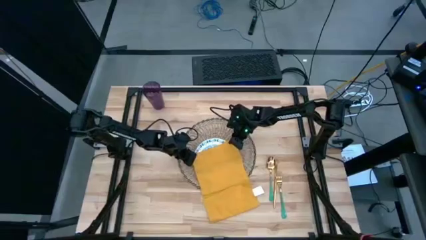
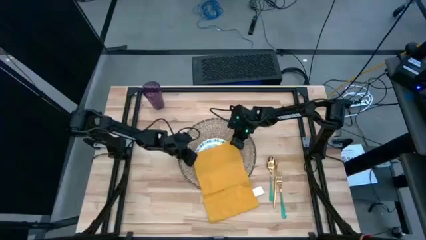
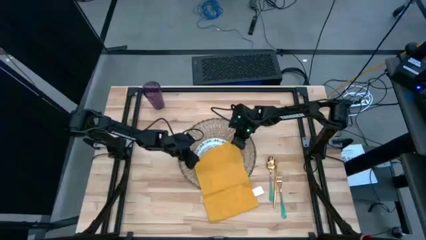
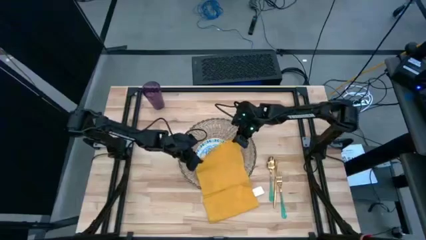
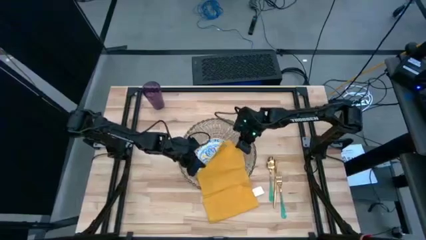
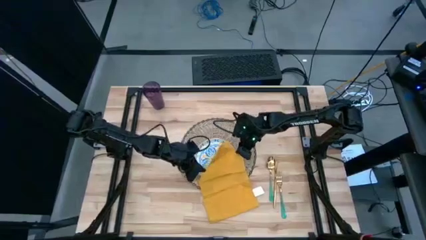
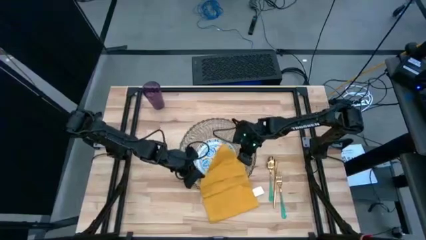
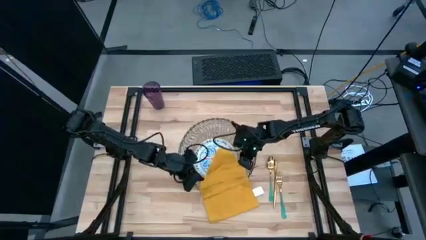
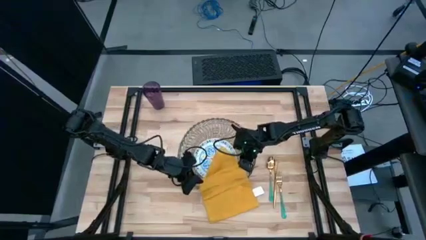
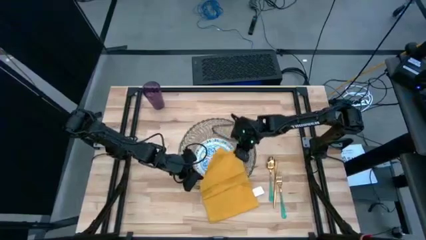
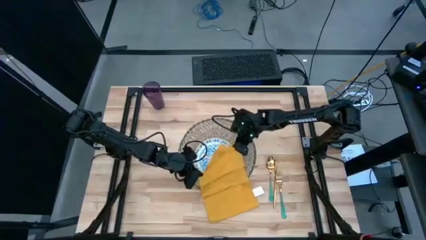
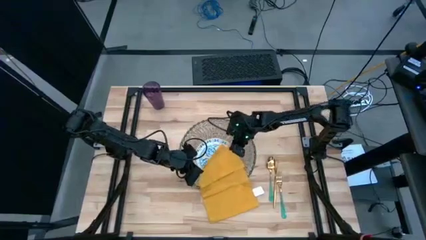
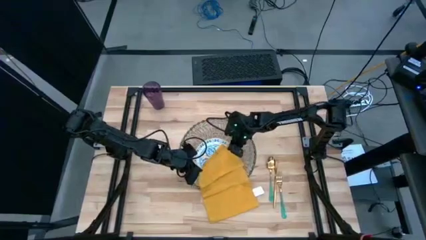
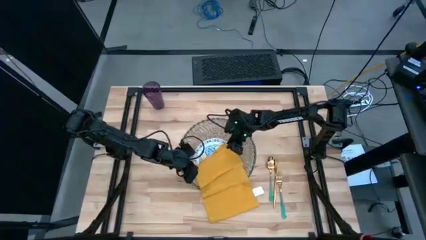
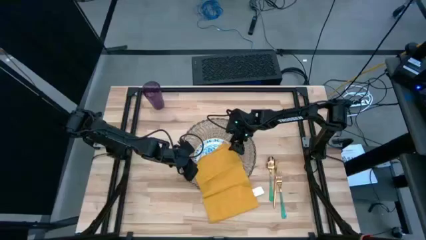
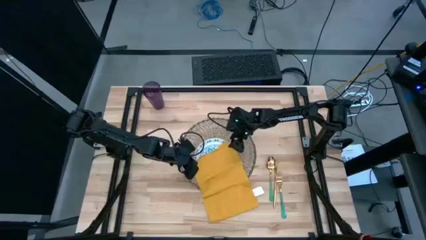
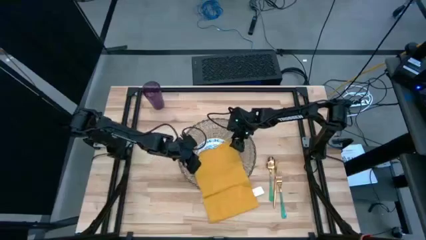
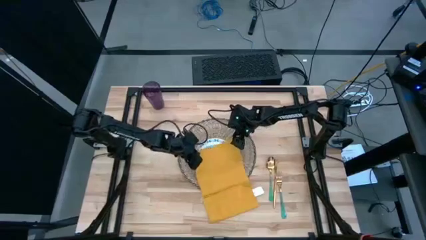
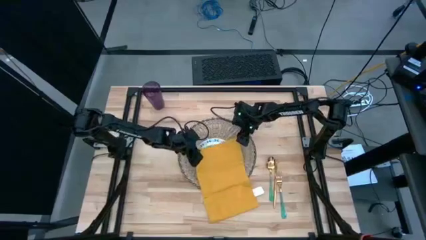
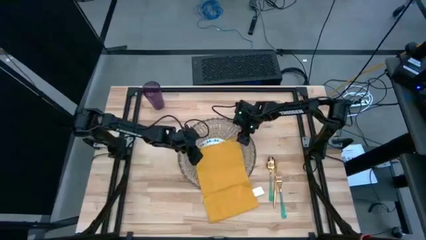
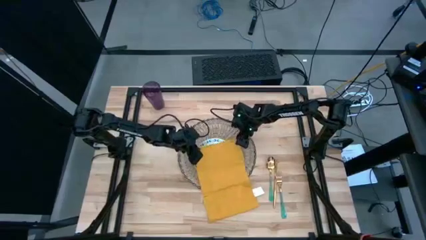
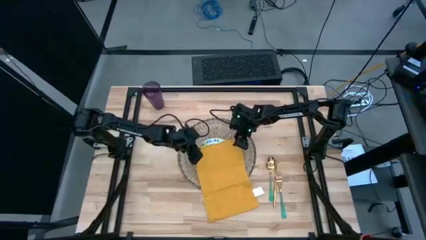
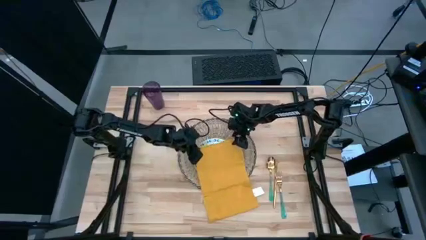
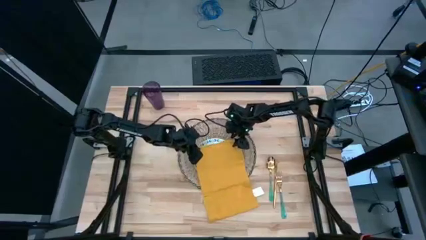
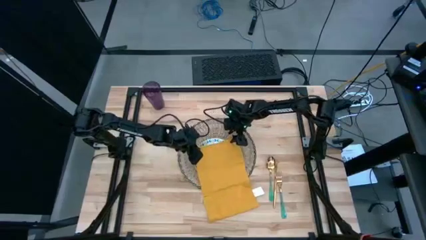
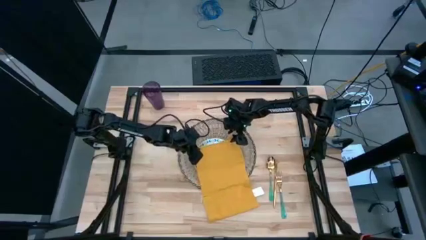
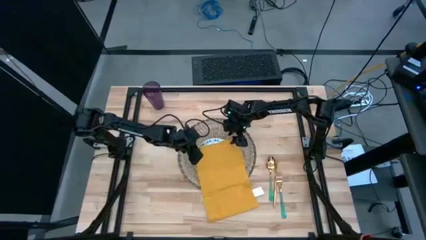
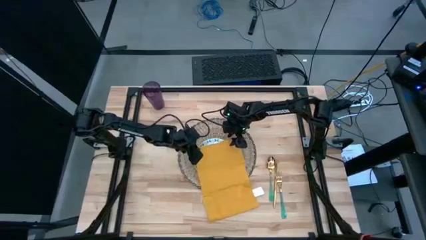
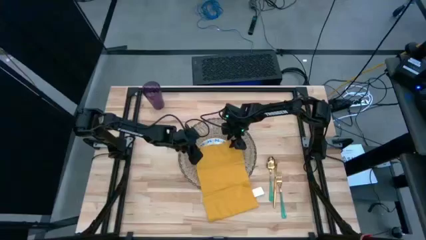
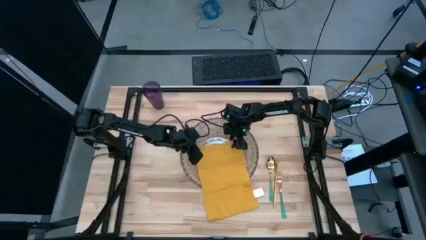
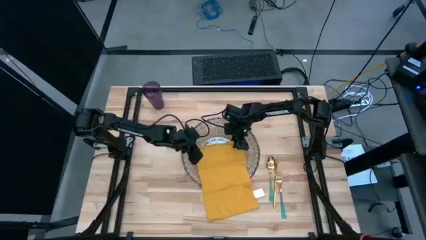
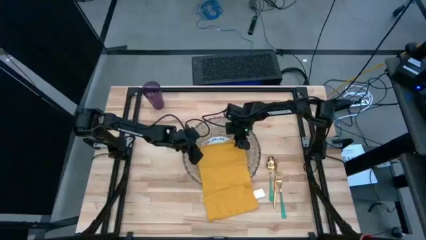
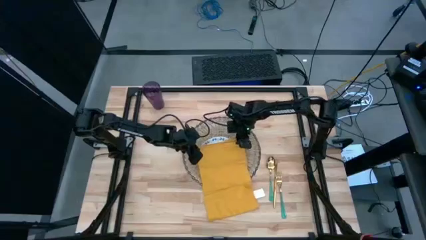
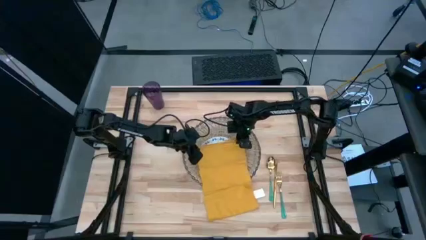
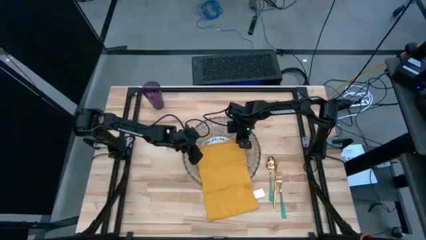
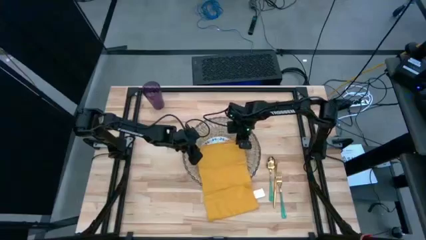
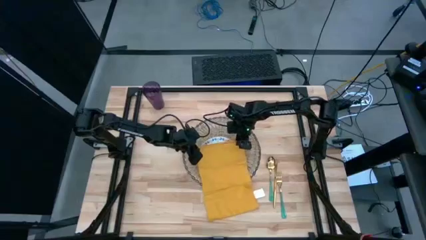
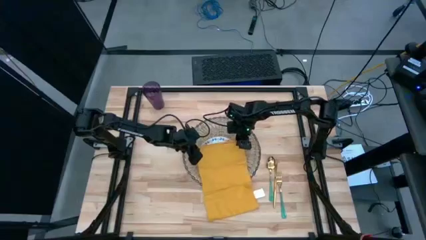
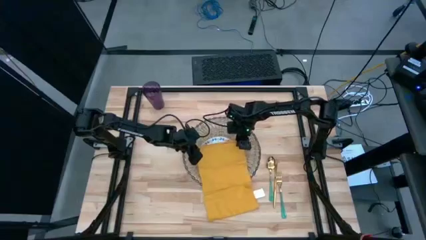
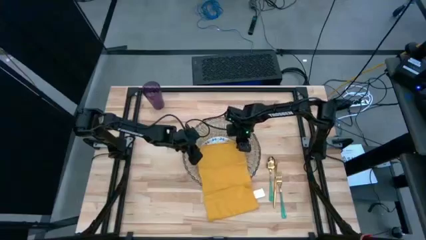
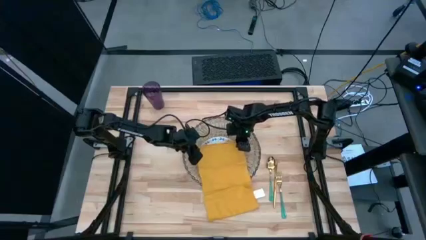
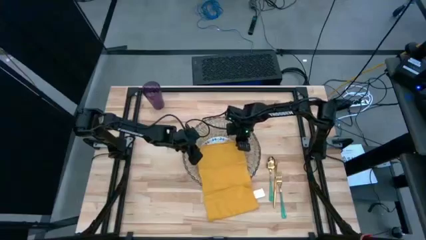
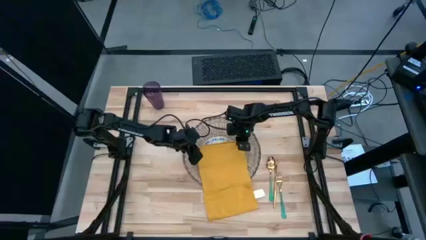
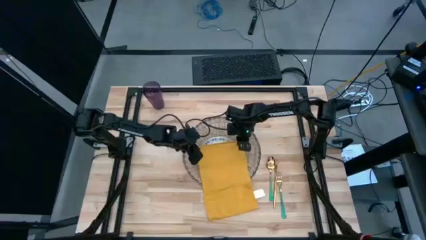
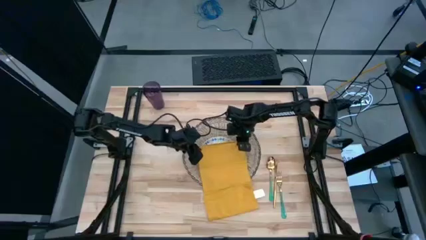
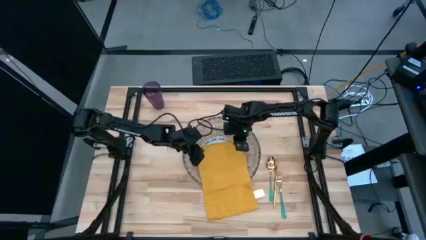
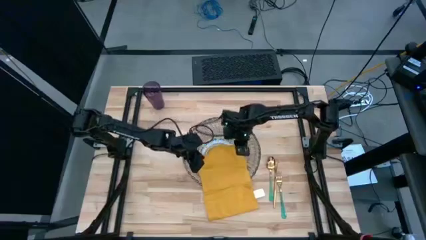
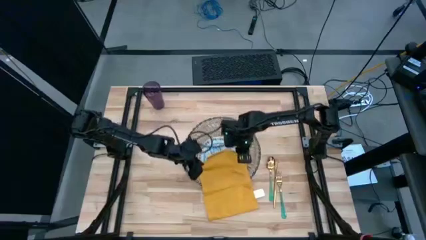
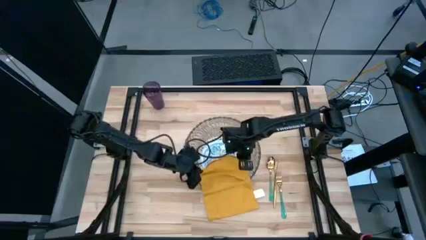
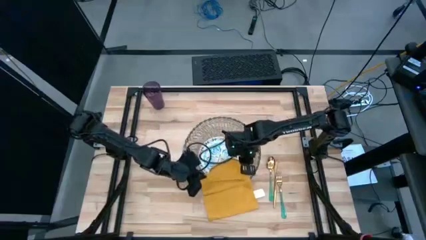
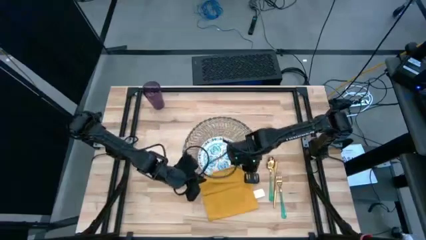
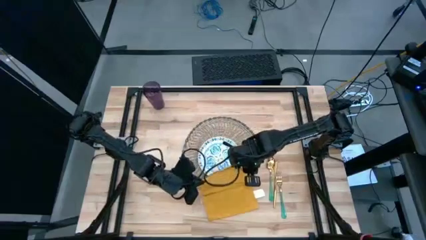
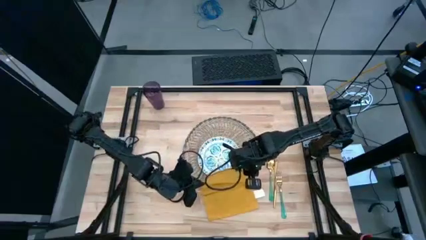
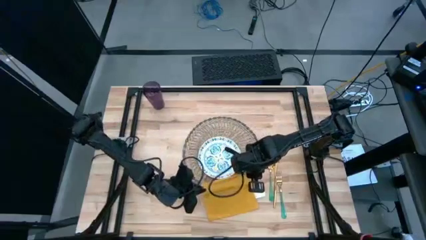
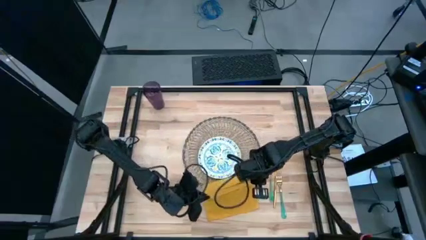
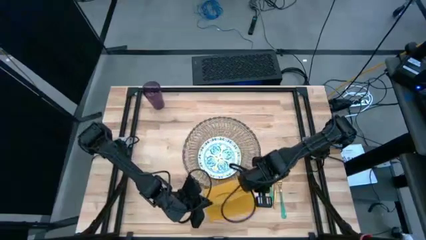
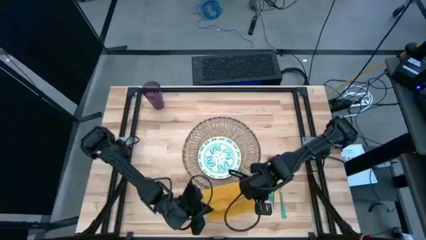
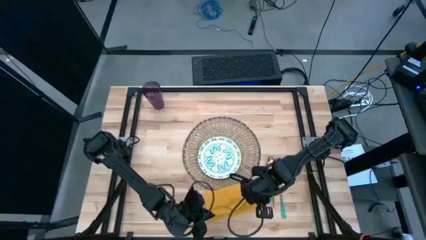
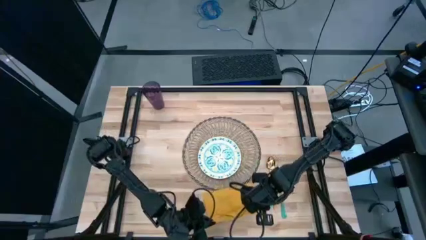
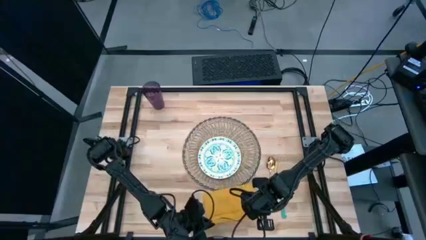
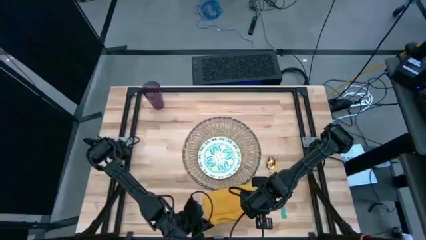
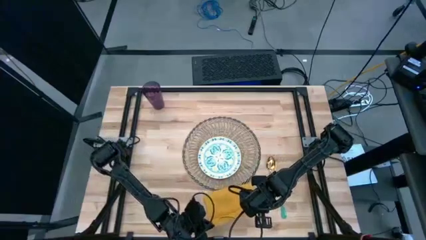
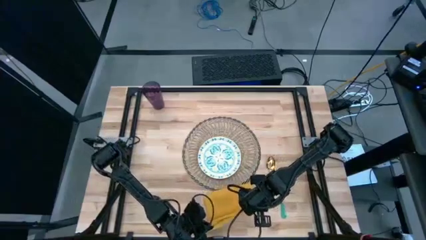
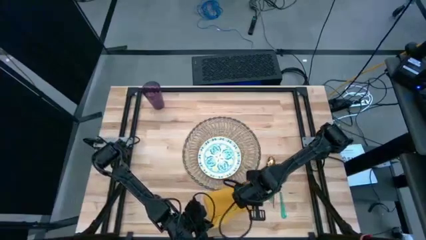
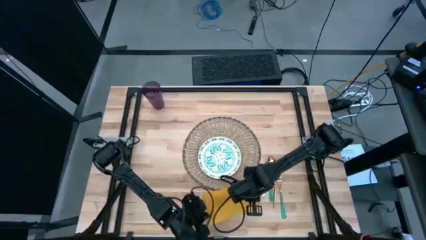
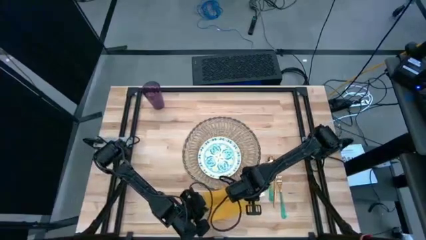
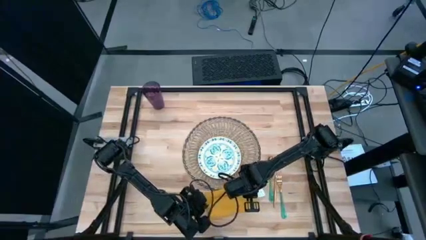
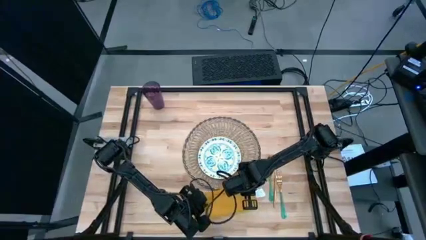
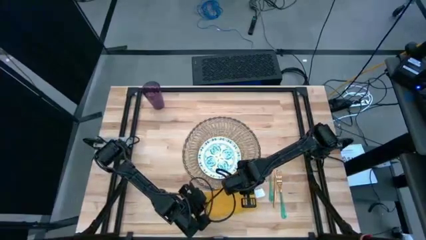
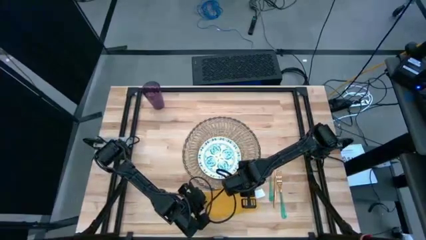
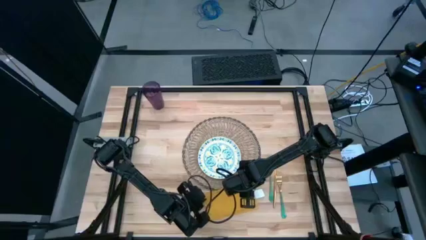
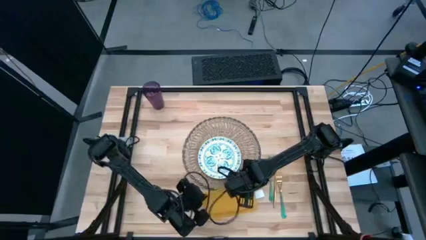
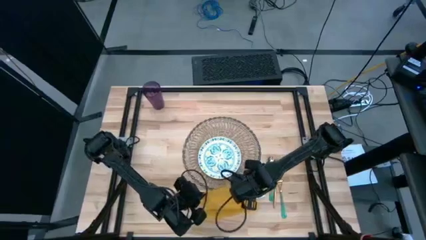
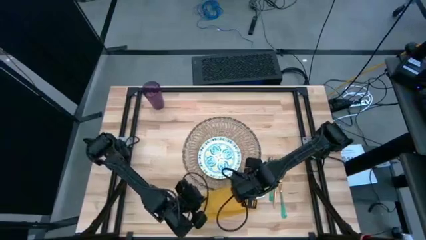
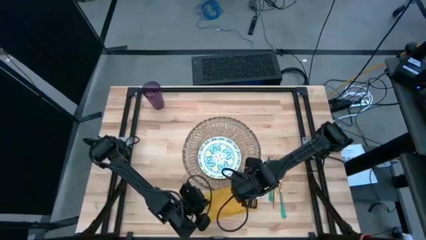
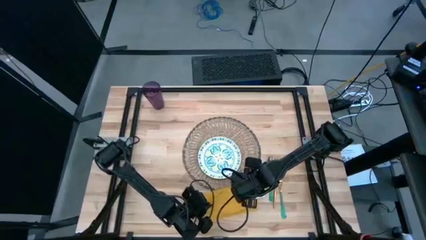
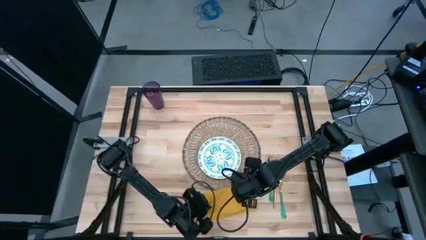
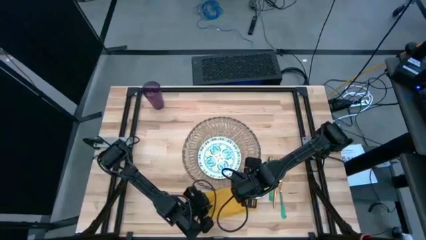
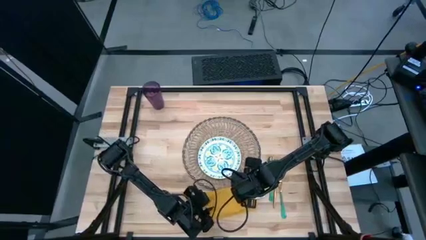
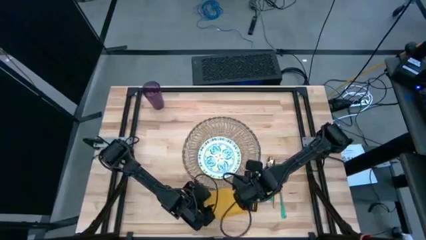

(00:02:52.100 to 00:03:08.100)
Task: Set table place
Fold the yellow table napkin

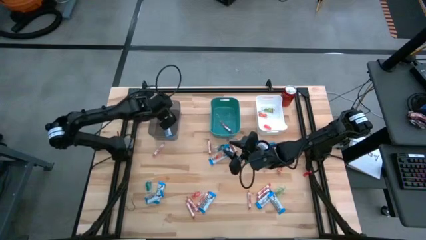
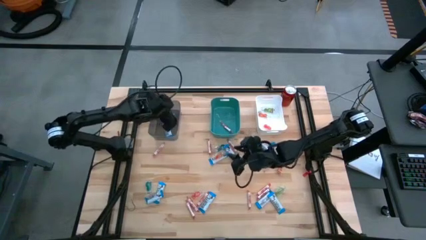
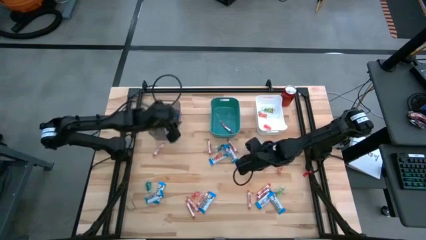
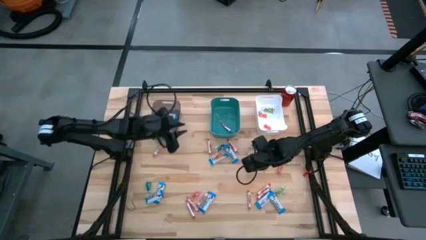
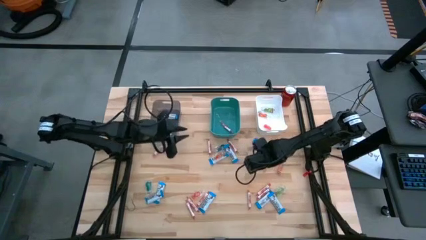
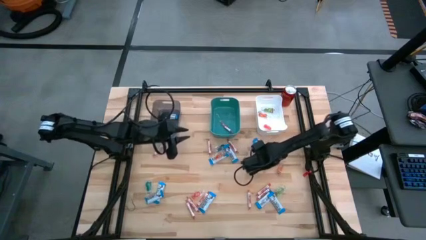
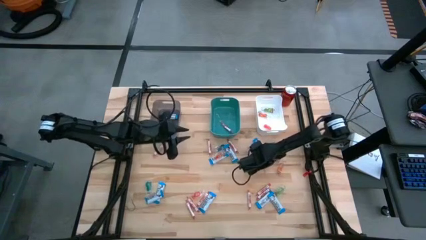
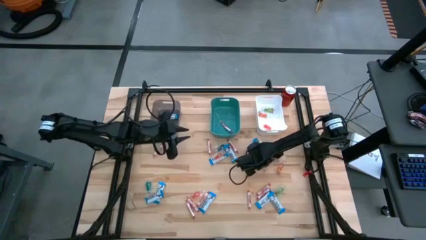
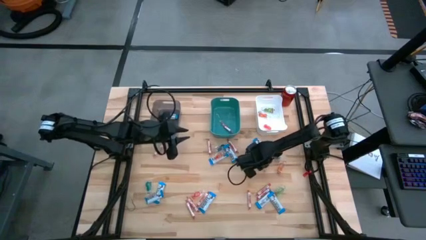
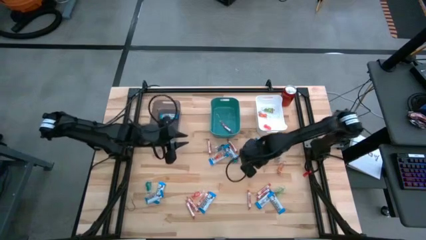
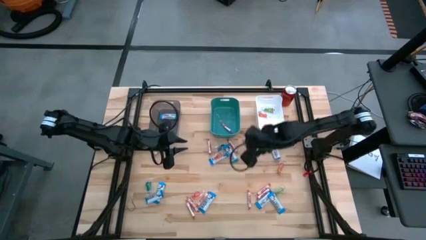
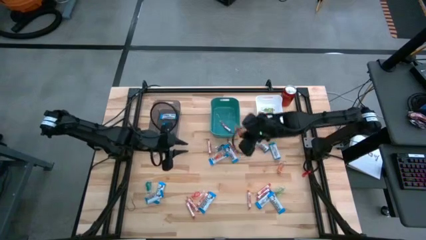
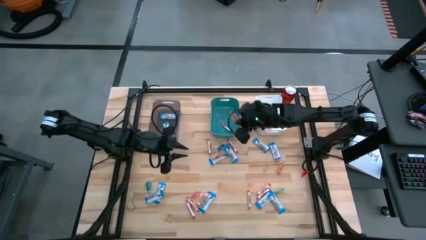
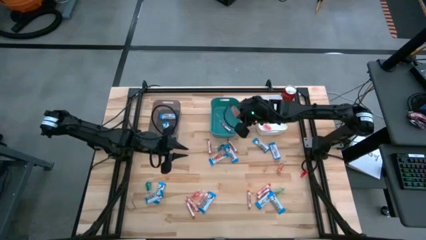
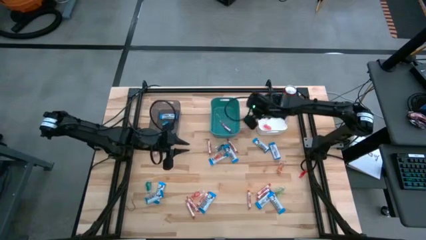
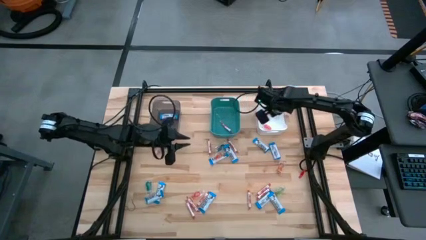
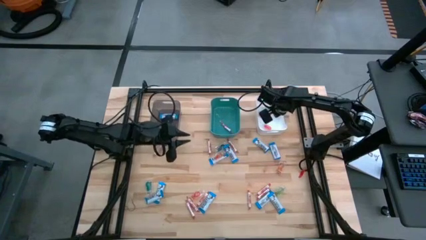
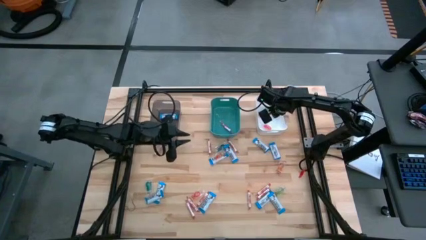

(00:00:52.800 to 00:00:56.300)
Task: Sort candy
Put the orange gummy into the white bin
